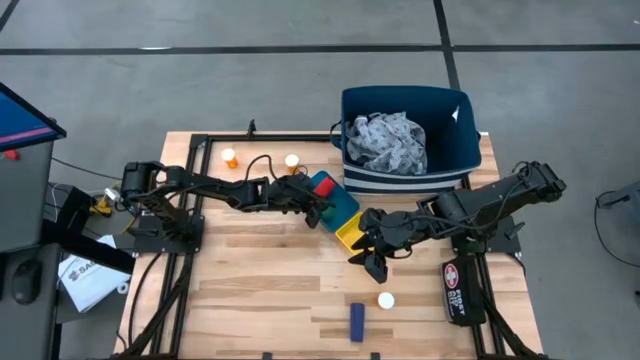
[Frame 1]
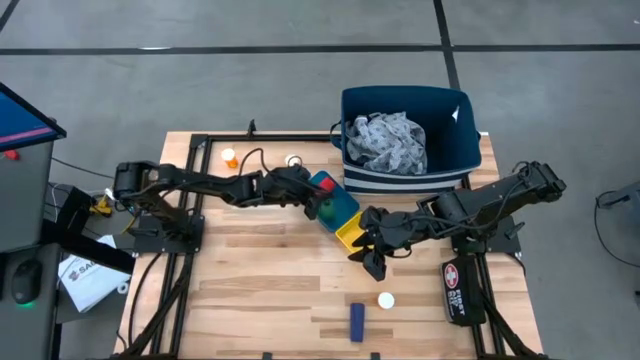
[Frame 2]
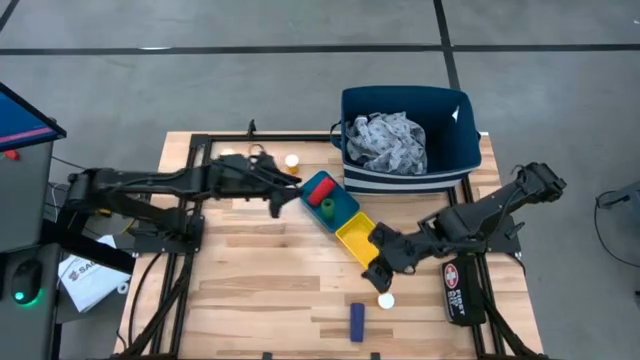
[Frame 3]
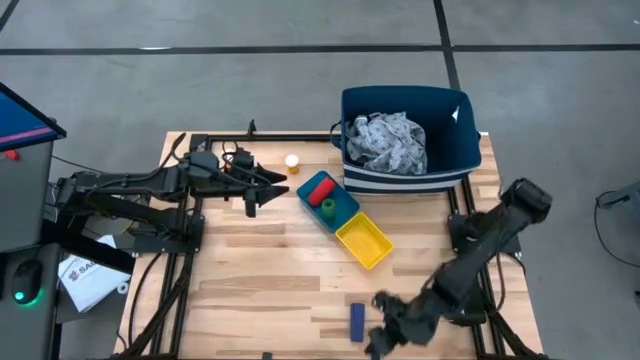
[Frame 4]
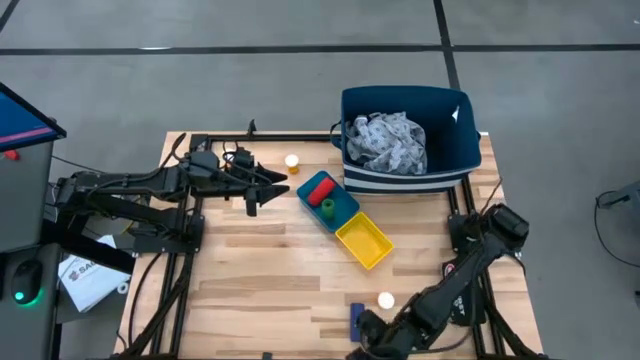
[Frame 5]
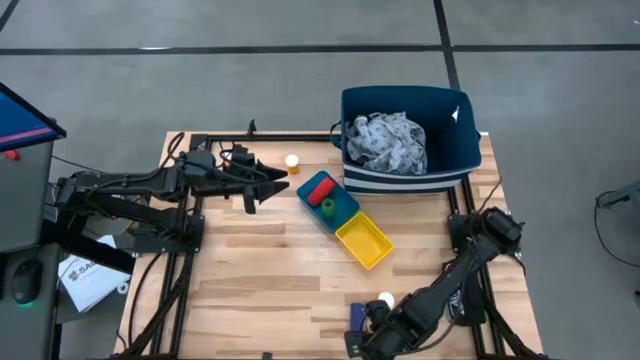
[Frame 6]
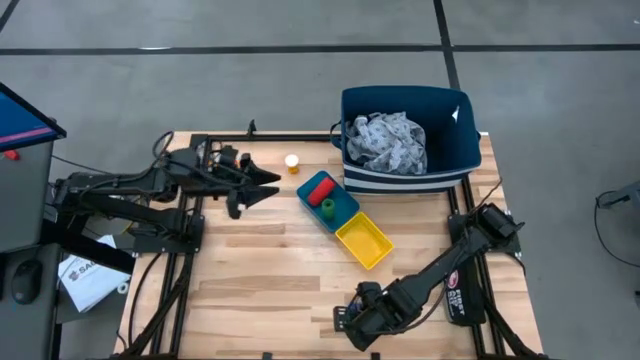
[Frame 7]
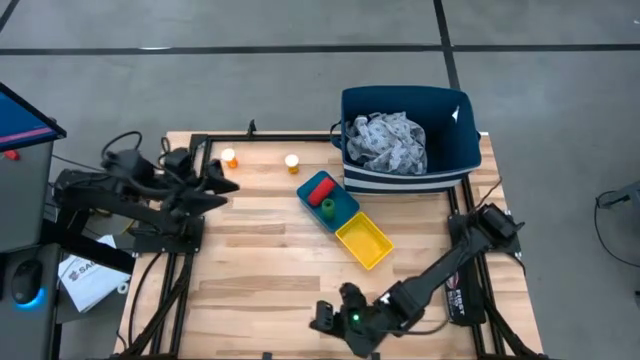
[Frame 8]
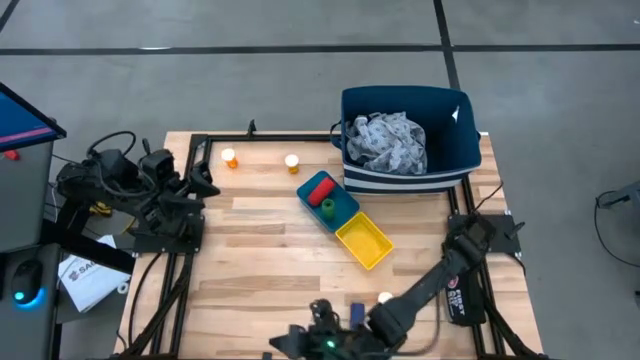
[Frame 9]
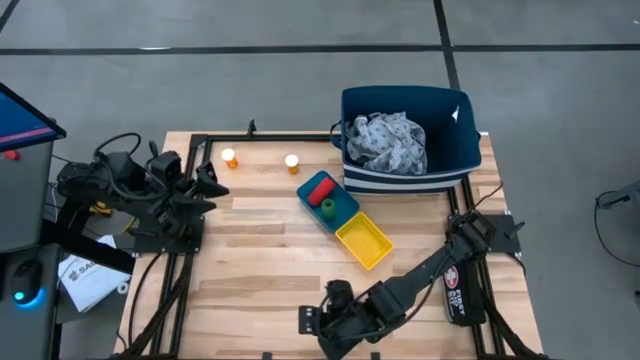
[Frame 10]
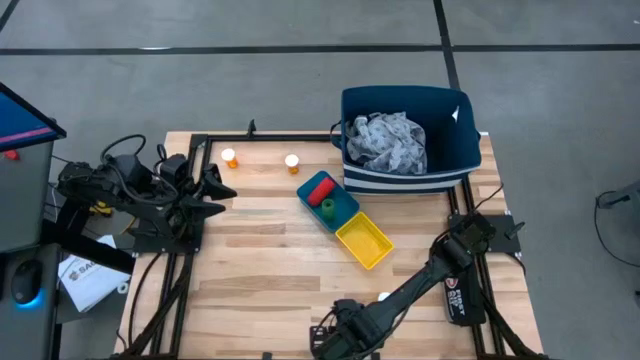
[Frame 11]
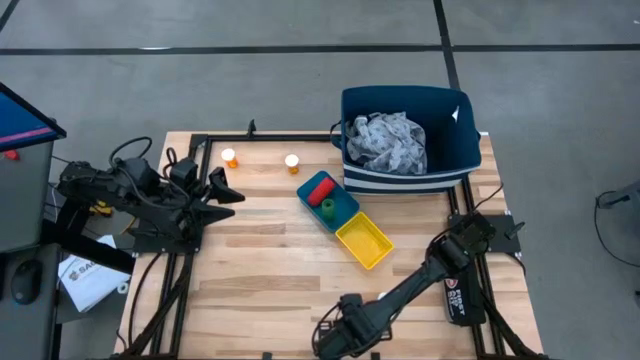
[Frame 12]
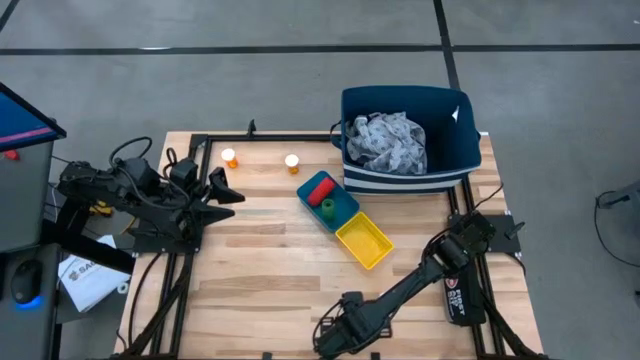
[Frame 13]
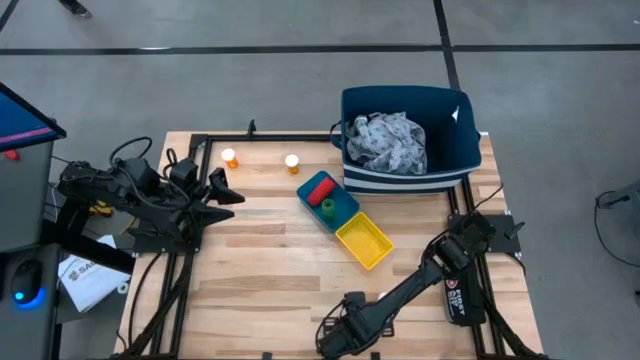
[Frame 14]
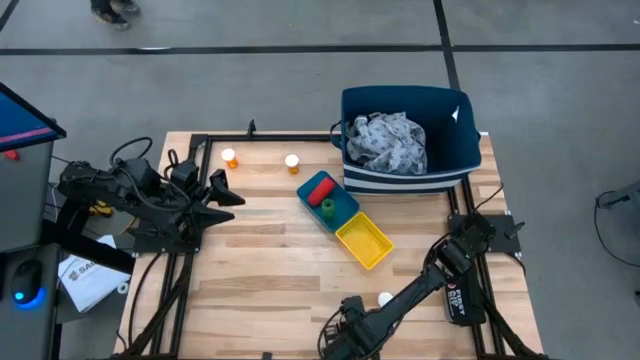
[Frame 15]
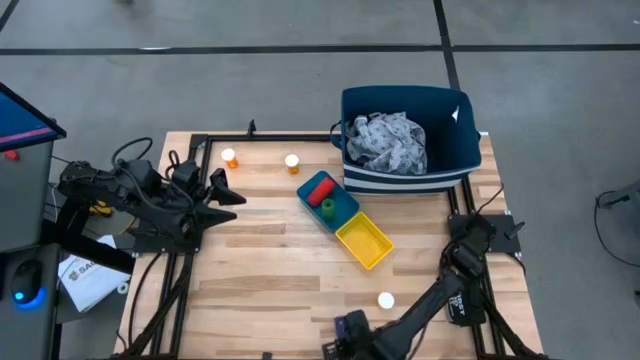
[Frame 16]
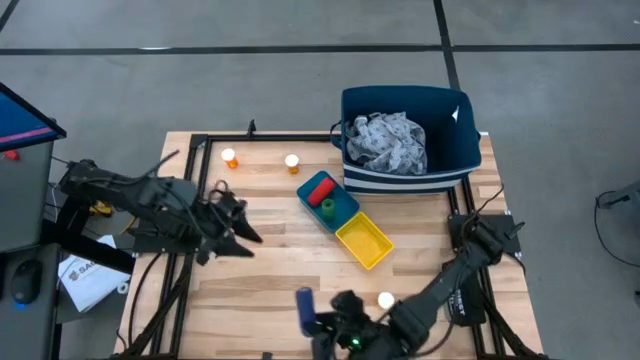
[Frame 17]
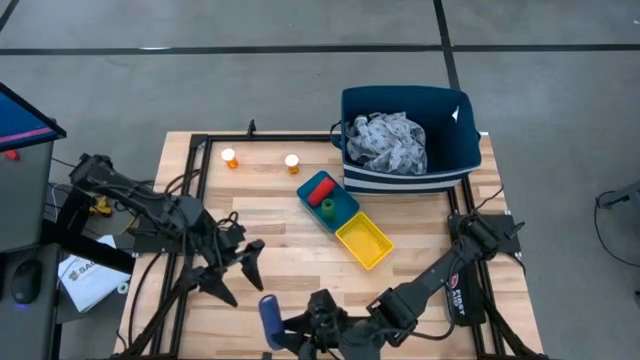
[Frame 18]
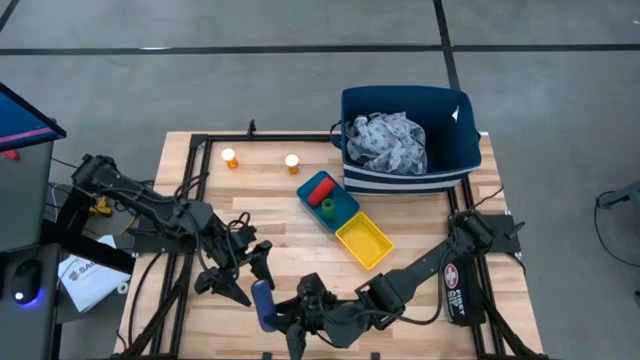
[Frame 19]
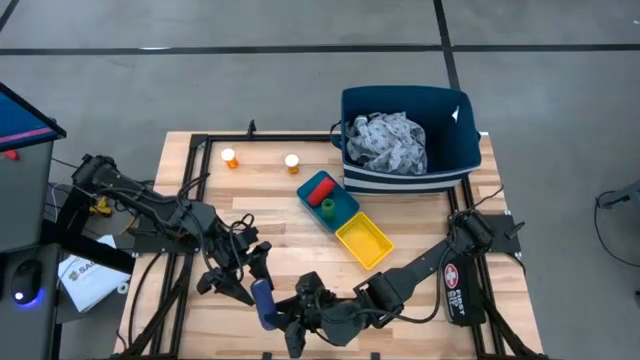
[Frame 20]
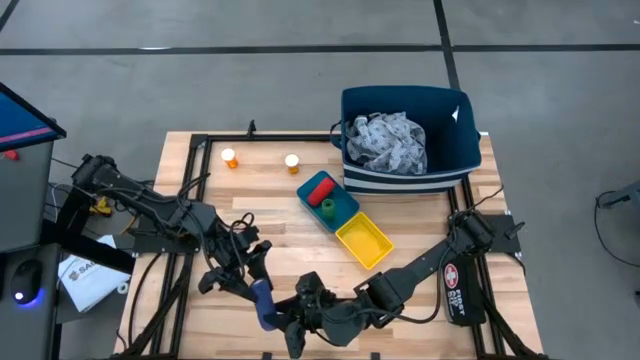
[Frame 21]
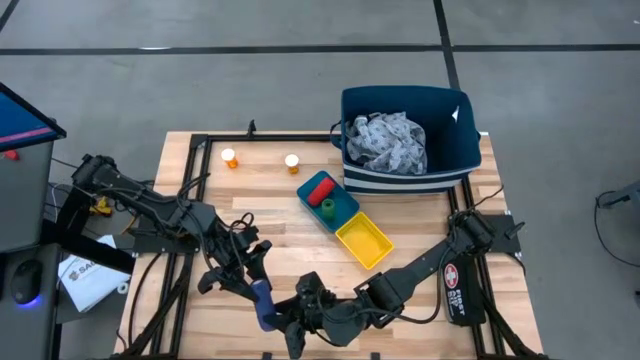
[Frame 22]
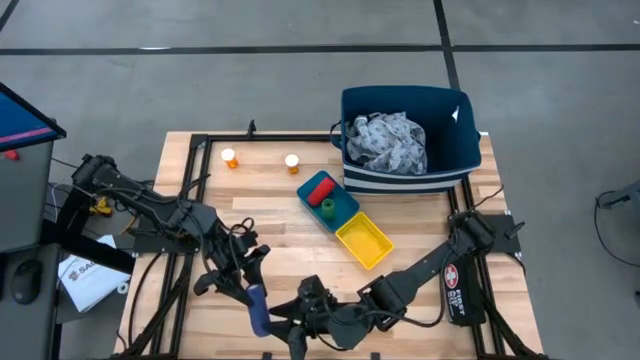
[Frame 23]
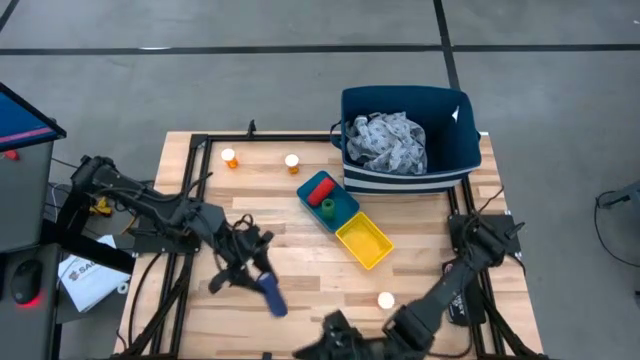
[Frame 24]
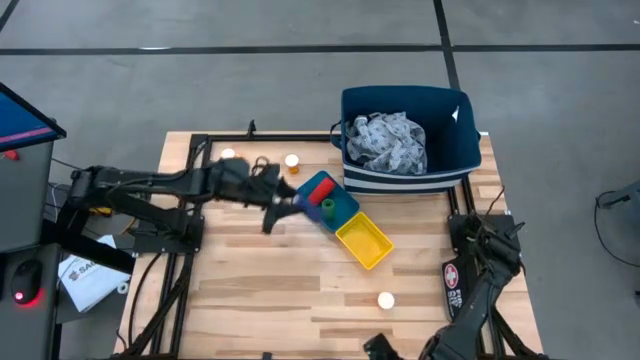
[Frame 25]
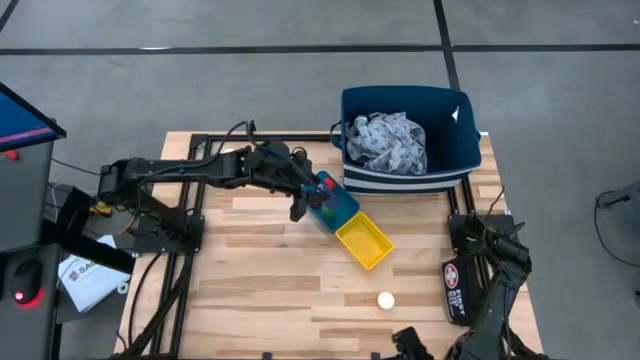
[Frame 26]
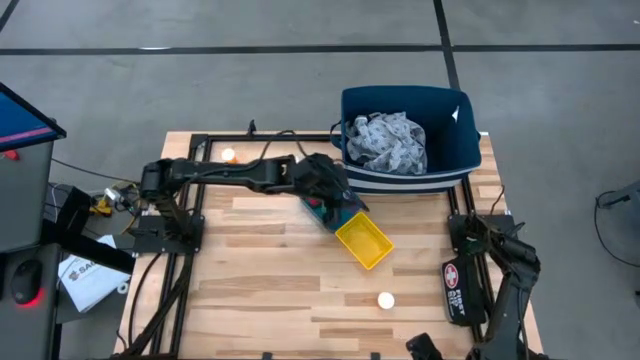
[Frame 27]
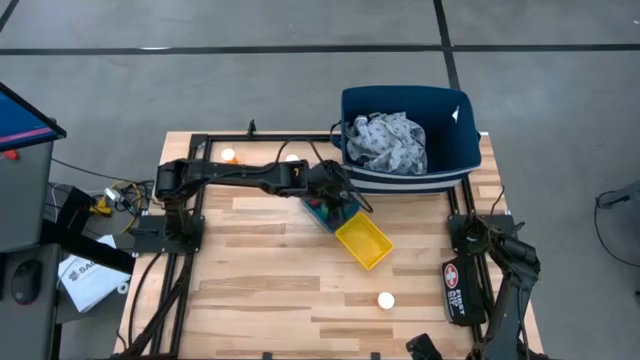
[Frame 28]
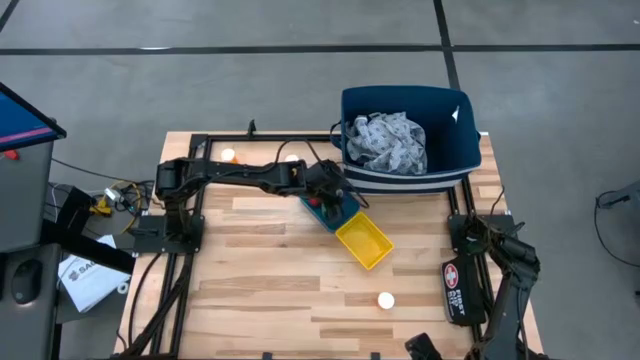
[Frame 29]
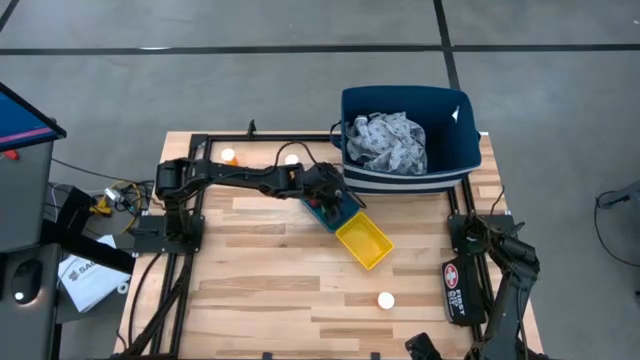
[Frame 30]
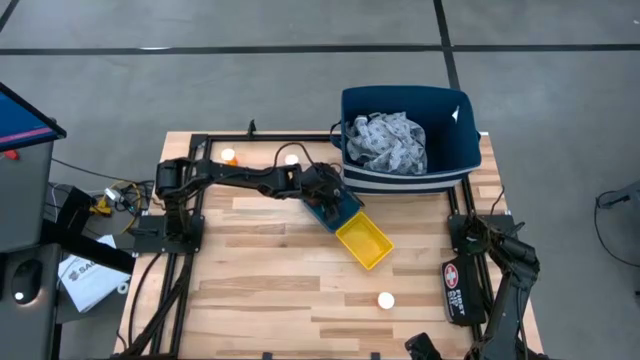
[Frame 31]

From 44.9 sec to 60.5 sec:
Task: Pick & Place Medicine items
Put the blue bandage into the blue bin

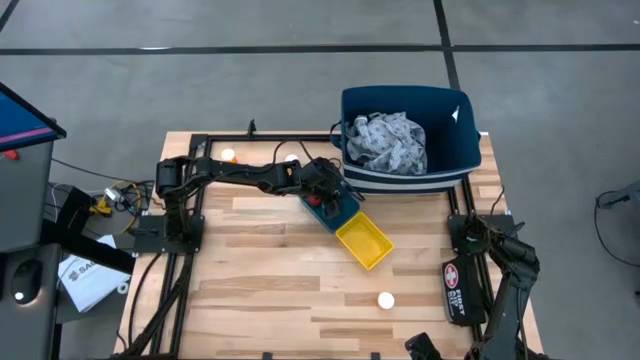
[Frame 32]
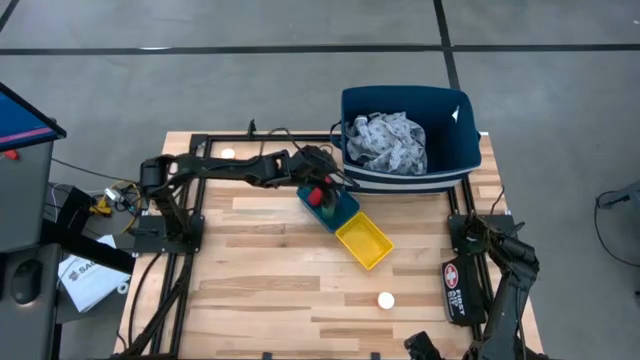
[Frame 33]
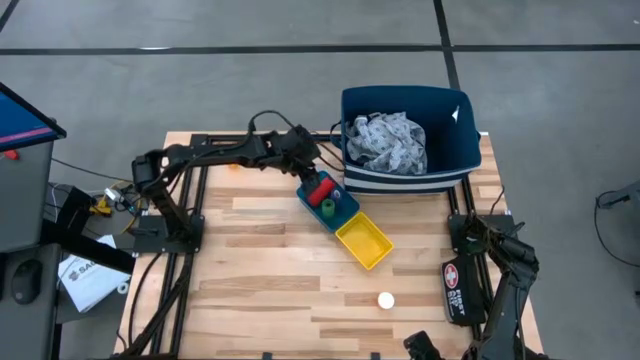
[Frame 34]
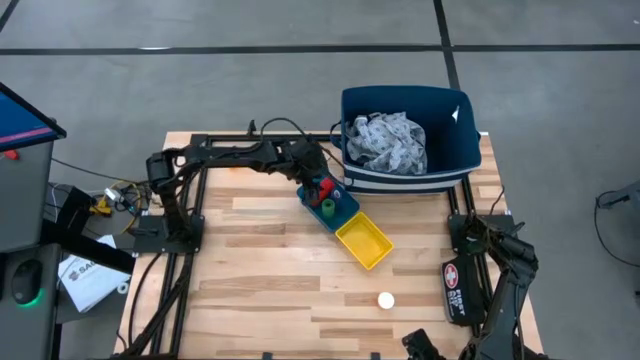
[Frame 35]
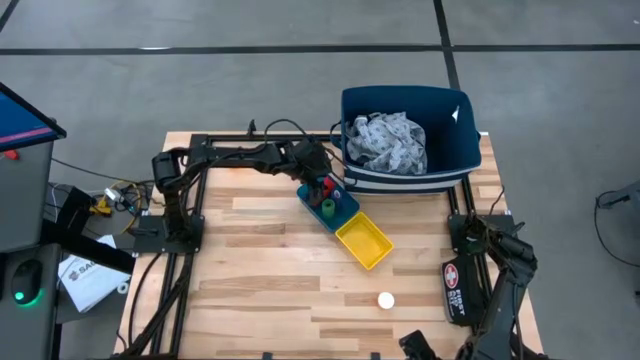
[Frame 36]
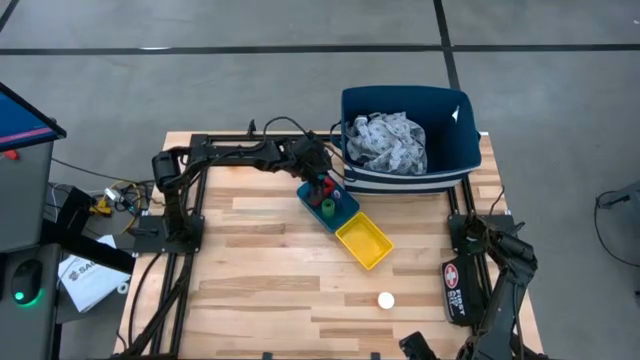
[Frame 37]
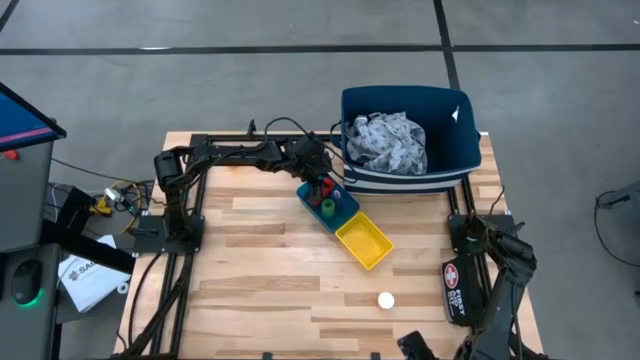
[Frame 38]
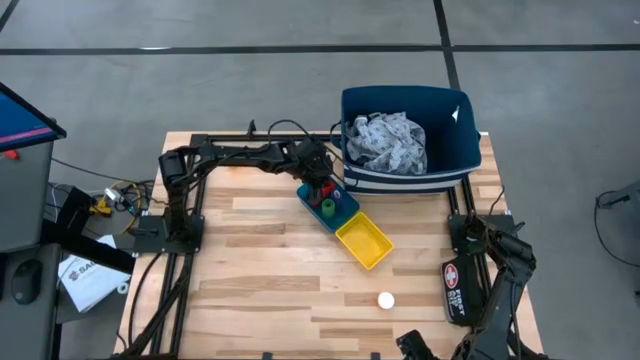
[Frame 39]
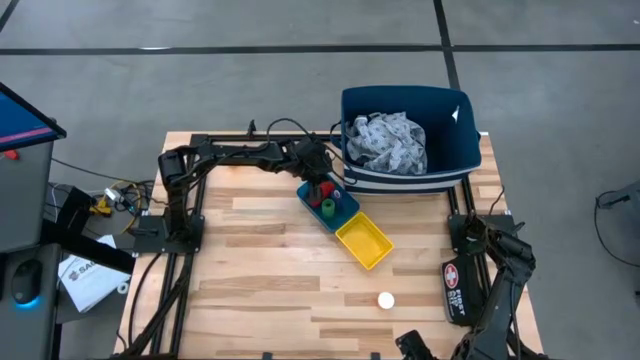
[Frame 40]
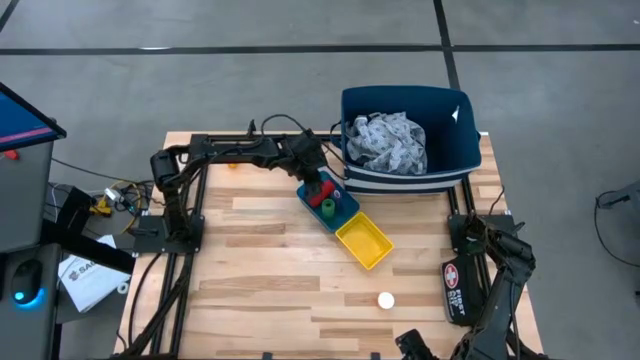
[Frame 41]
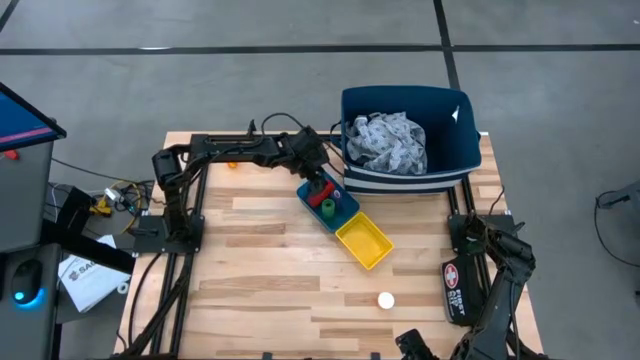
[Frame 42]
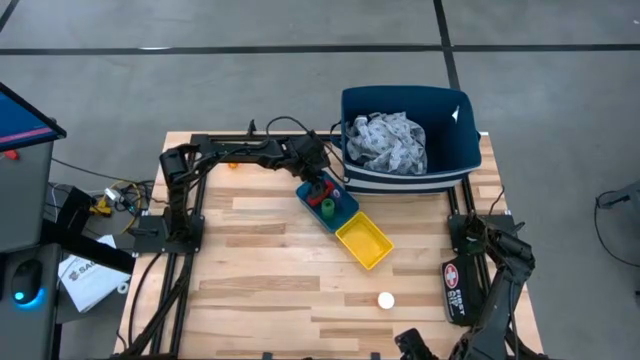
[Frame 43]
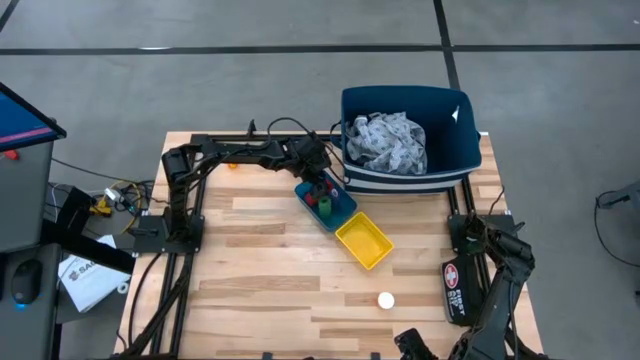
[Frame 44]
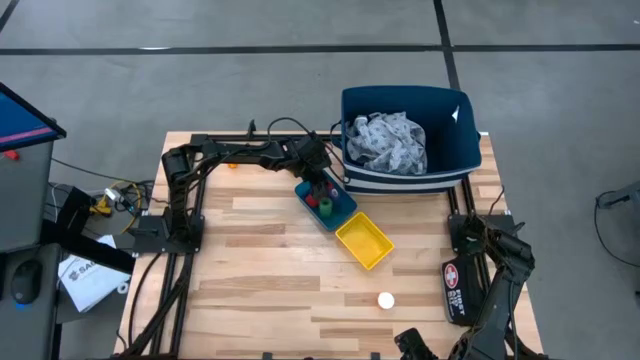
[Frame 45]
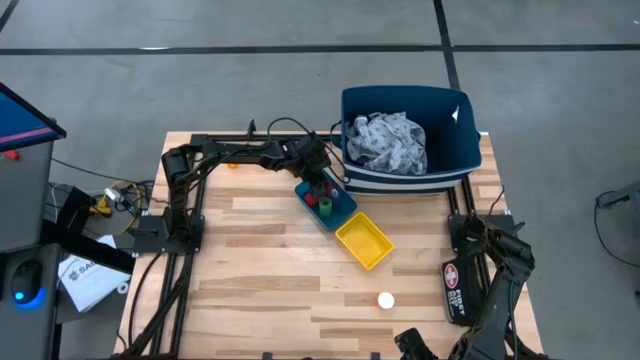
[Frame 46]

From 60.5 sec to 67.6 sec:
Adjust the red bandage in the blue bin
